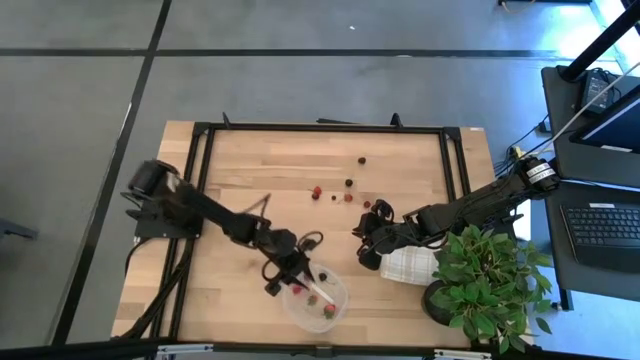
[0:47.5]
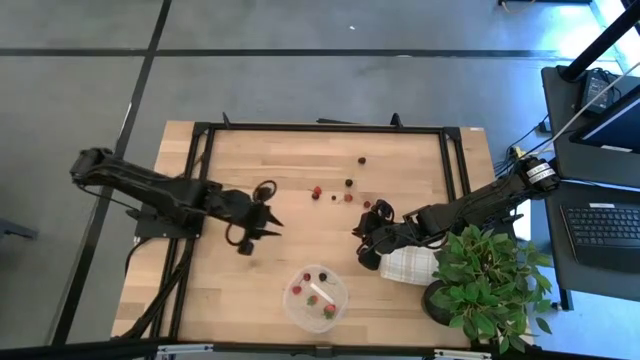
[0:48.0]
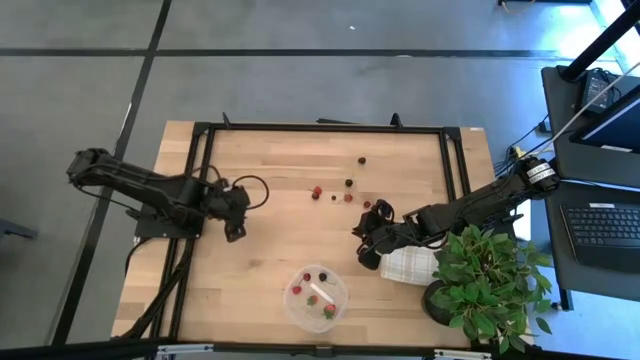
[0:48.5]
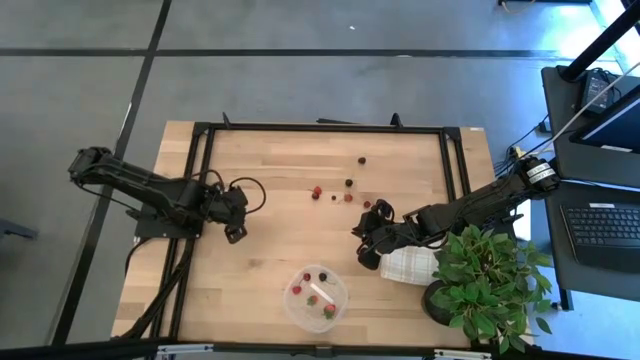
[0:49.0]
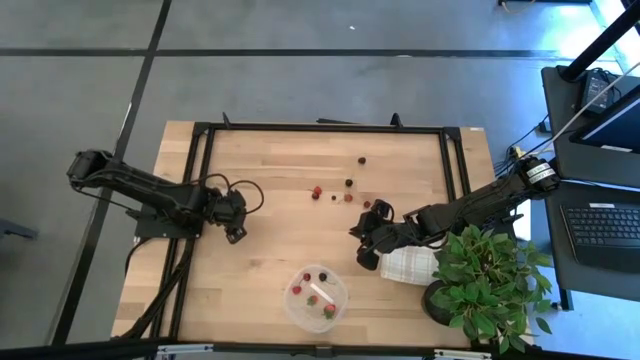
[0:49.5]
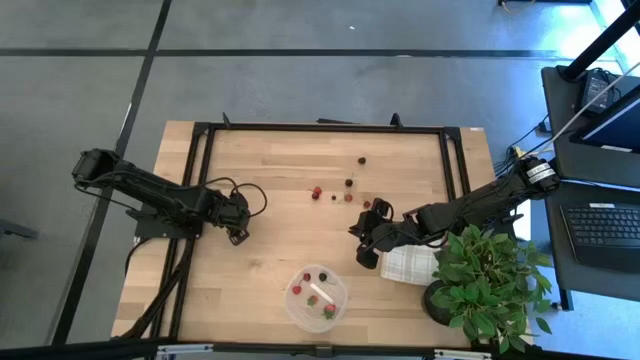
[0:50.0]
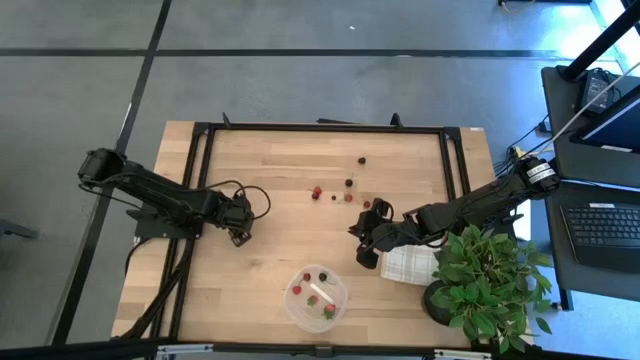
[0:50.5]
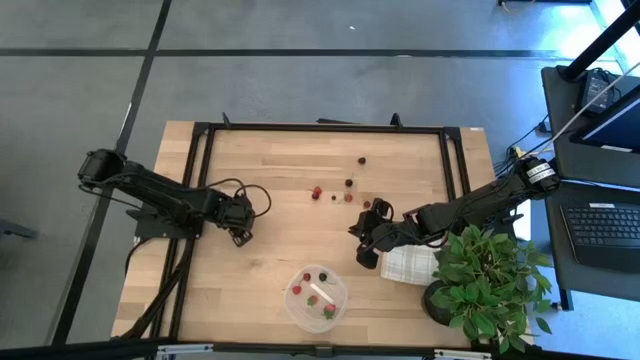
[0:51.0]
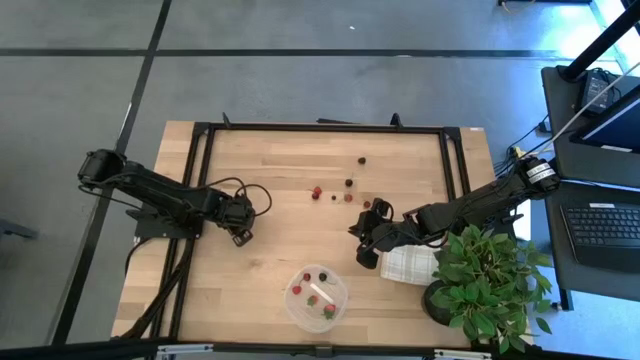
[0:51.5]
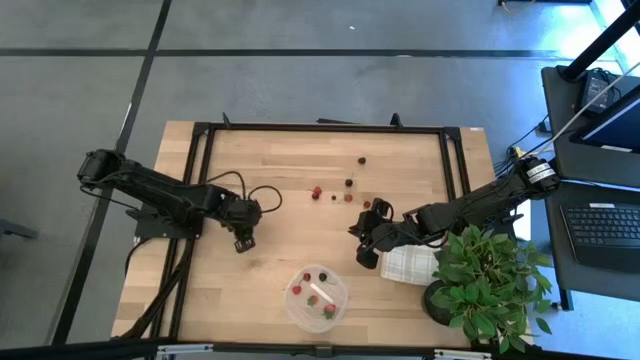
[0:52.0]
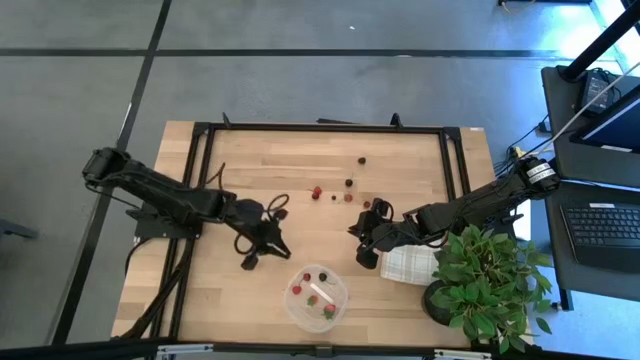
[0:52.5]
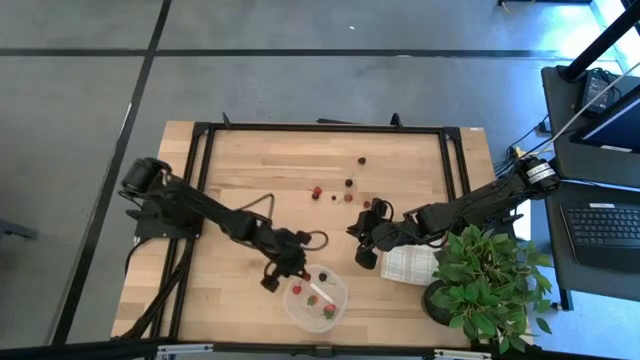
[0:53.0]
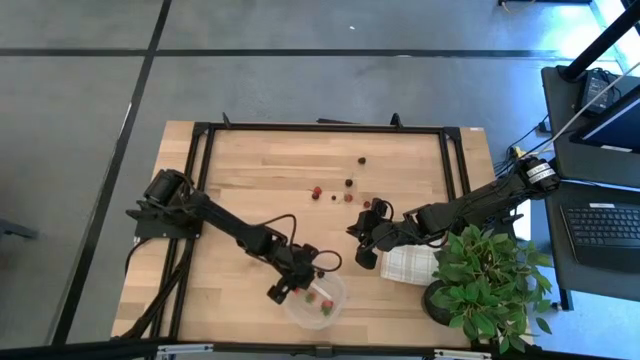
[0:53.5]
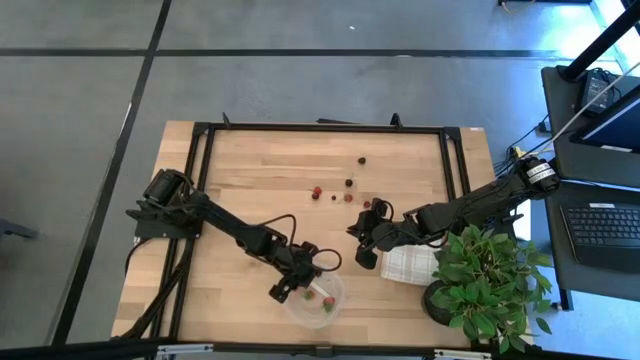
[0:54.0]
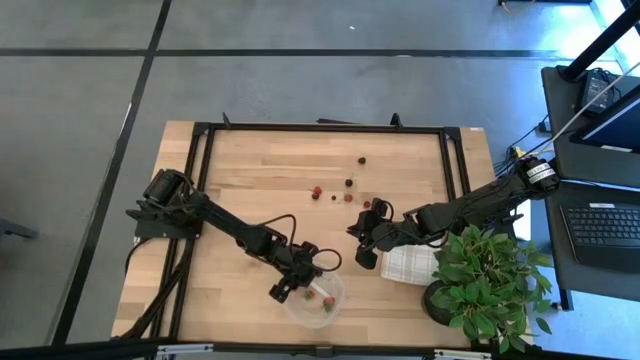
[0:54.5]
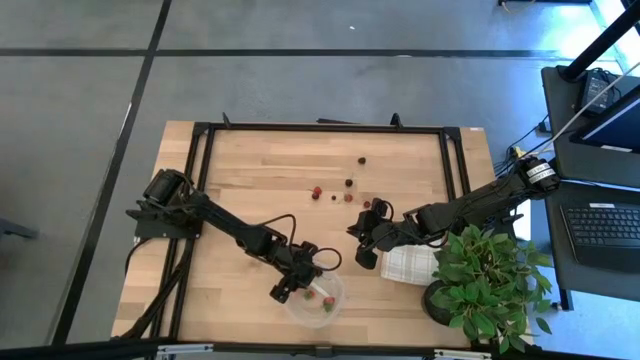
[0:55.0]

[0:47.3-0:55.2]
Task: Pick and placing Produce into tupperware
Put the blueberry in the bottom transparent bin

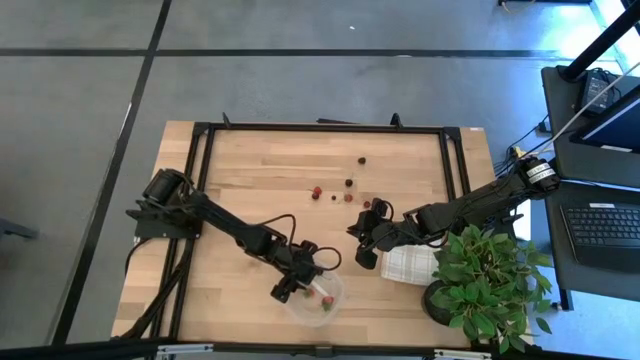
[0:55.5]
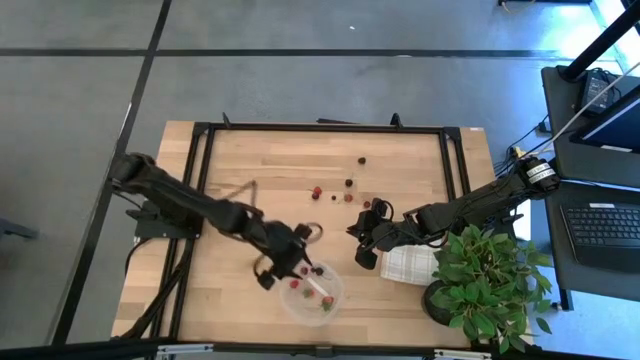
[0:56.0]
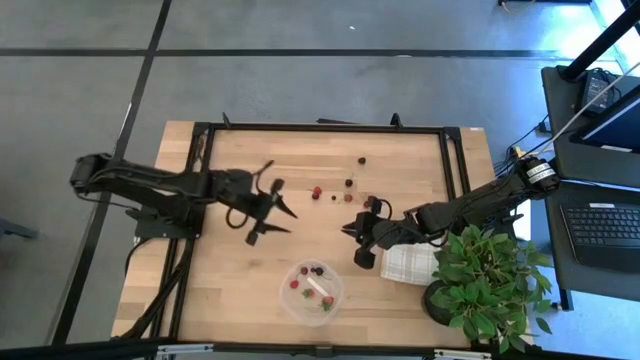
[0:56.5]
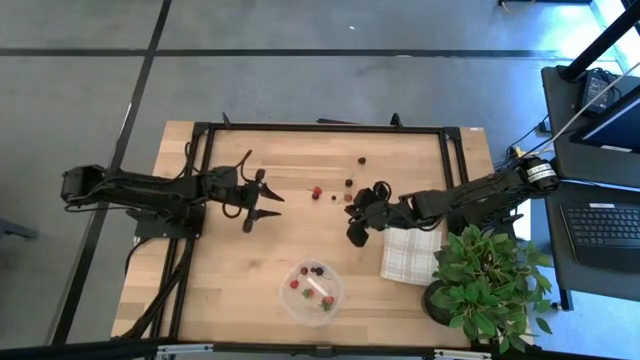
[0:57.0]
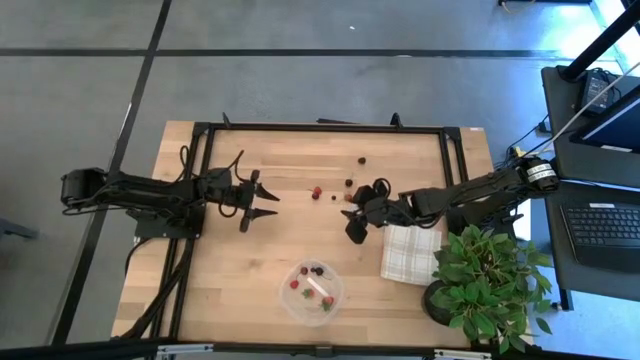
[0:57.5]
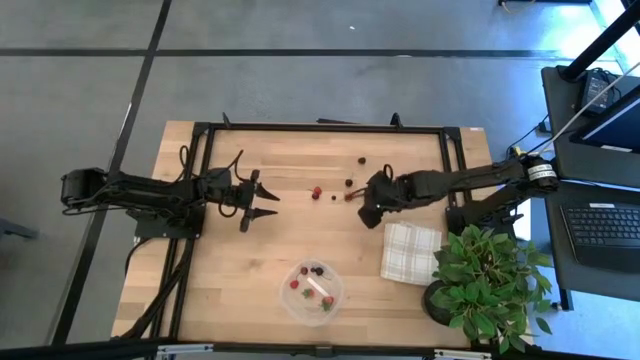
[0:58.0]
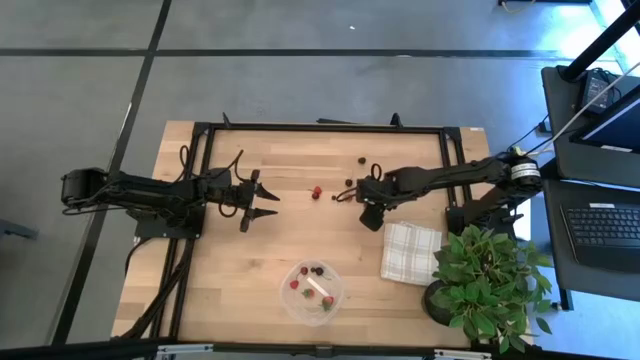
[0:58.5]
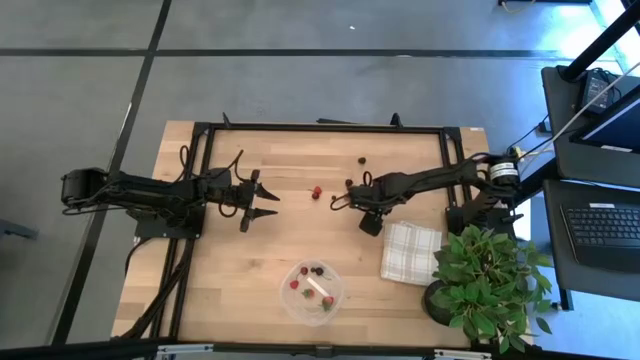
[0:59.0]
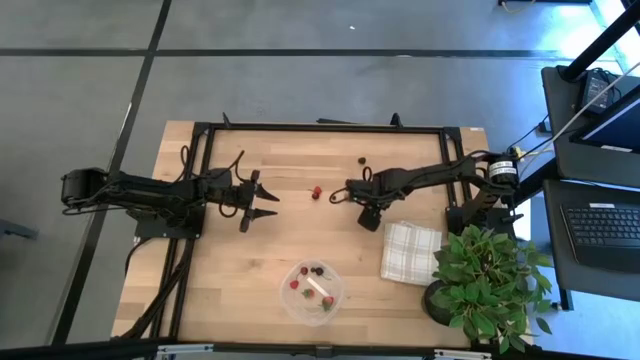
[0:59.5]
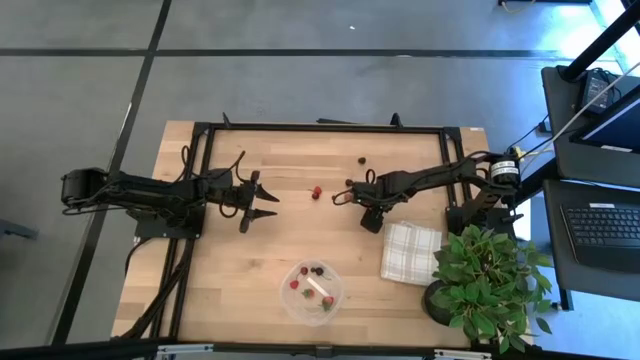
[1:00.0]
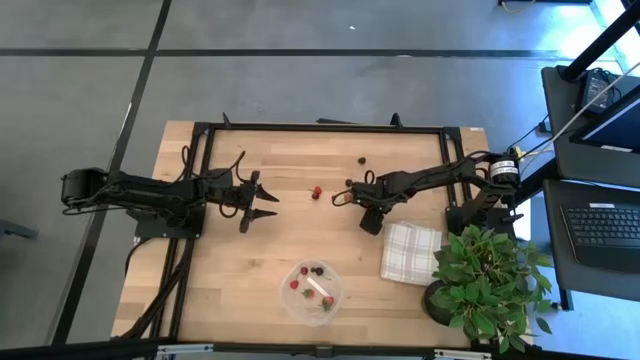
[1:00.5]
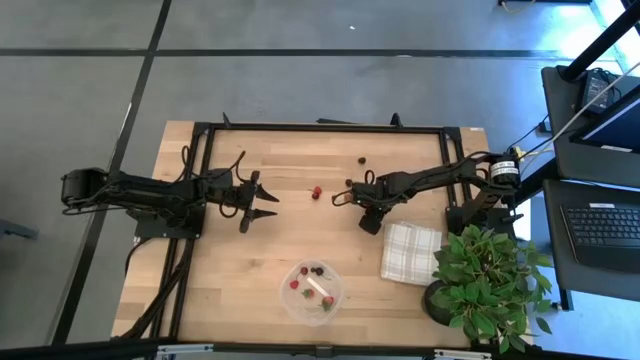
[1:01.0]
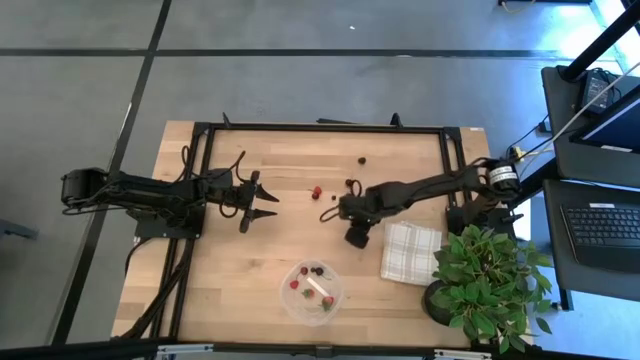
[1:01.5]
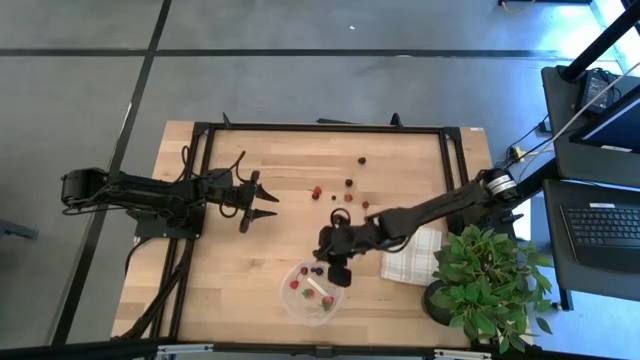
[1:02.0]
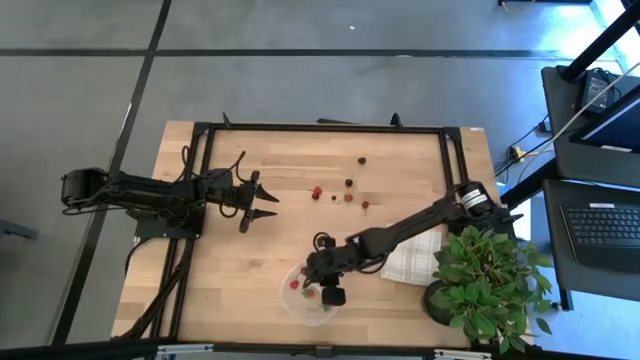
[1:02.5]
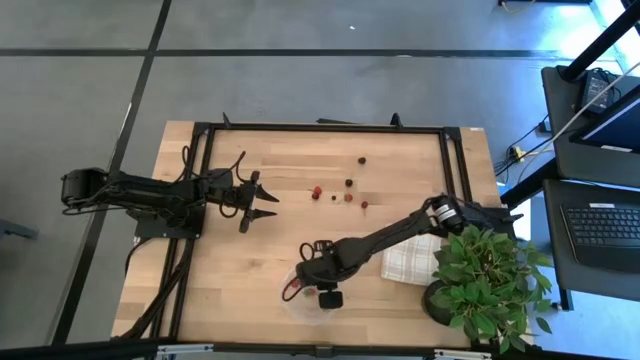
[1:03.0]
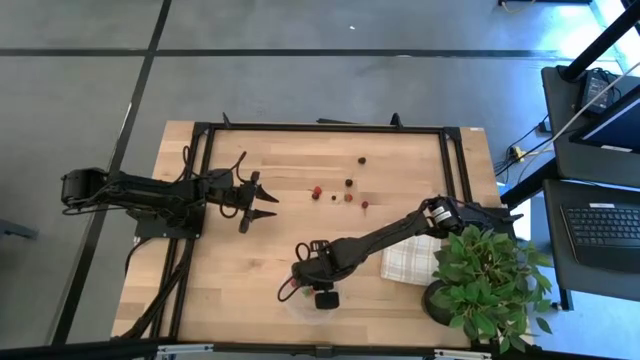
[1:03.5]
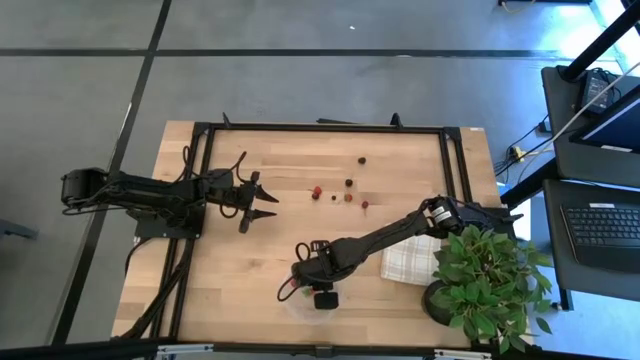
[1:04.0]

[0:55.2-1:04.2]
Put the blackberry in the bottom transparent bin

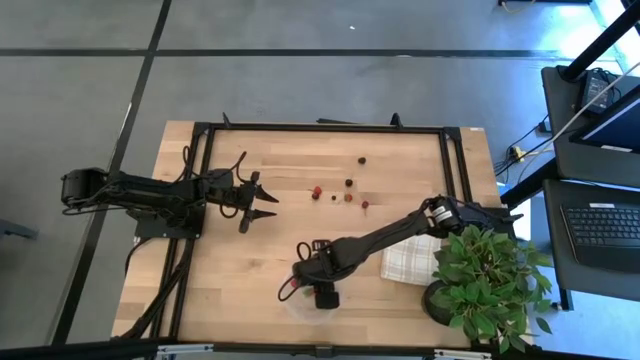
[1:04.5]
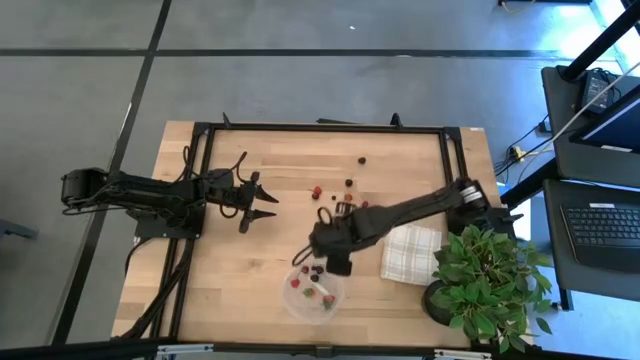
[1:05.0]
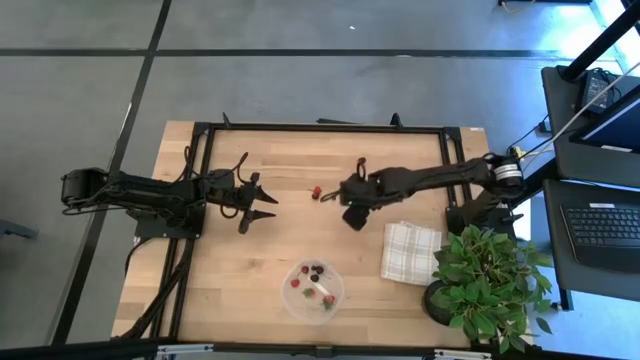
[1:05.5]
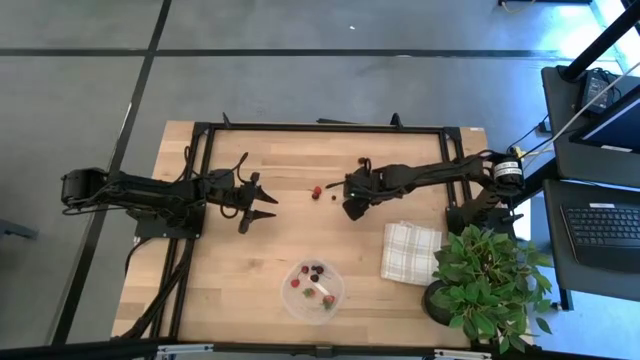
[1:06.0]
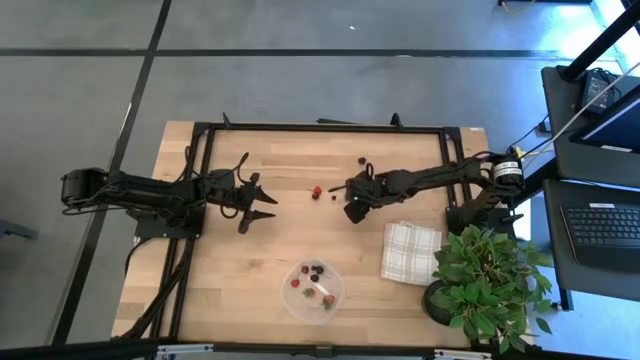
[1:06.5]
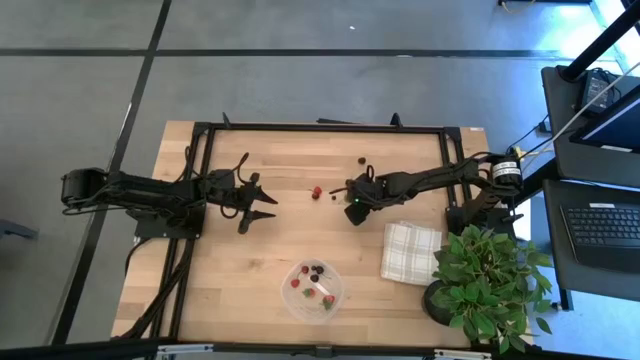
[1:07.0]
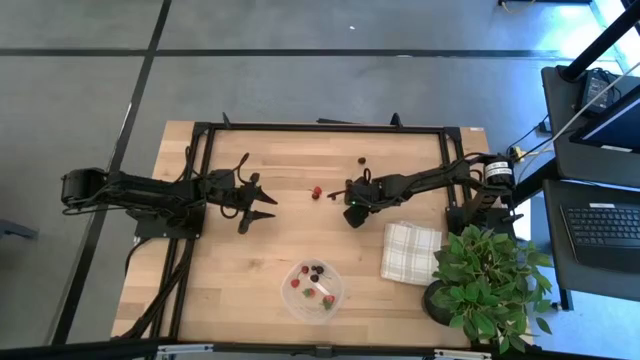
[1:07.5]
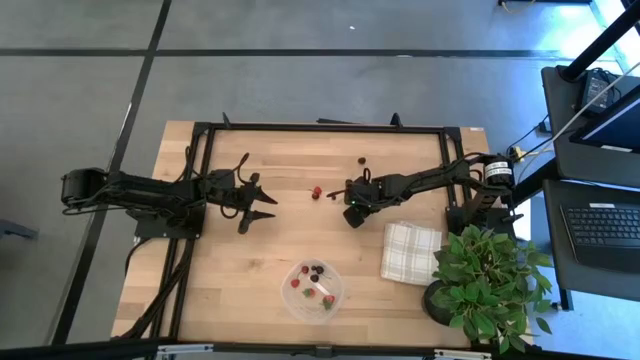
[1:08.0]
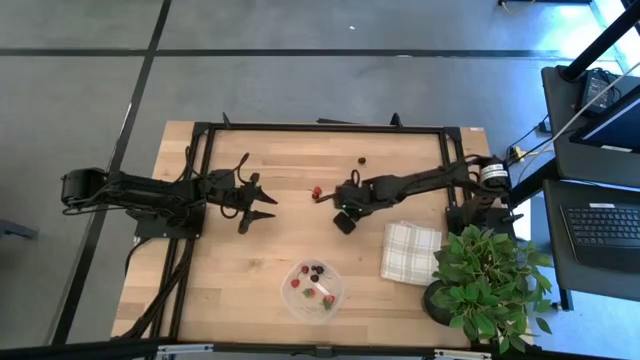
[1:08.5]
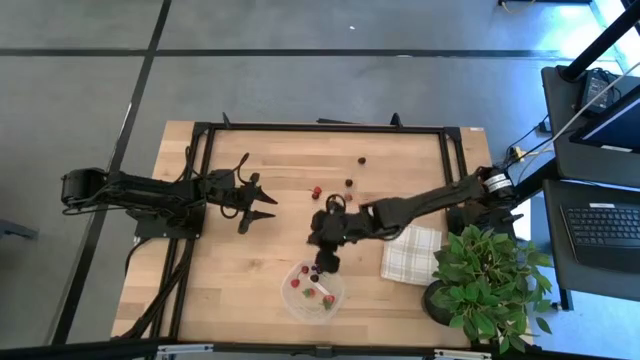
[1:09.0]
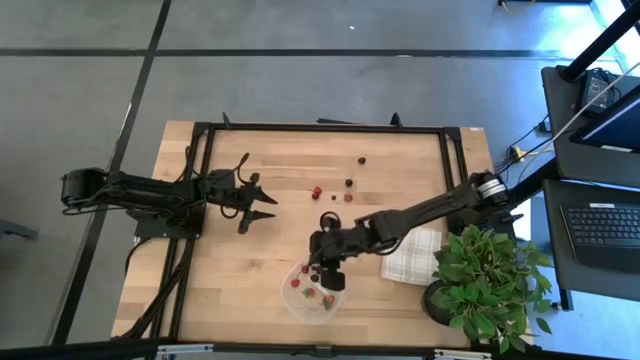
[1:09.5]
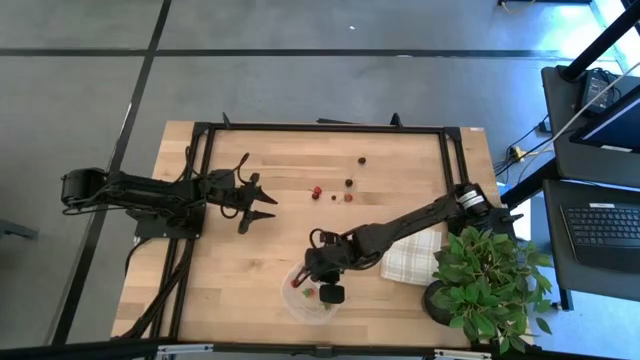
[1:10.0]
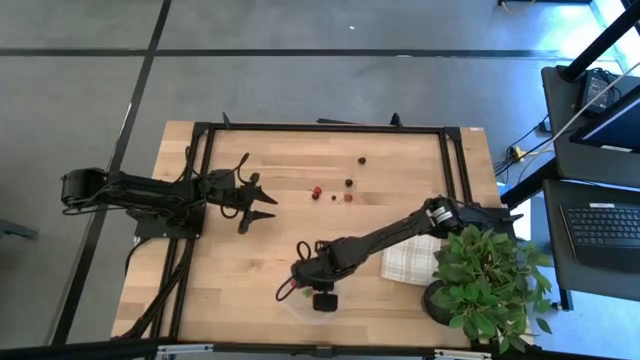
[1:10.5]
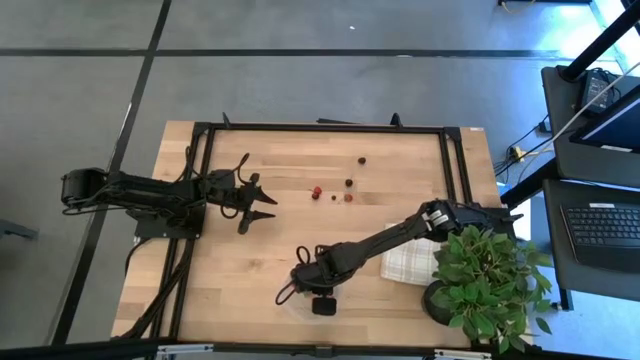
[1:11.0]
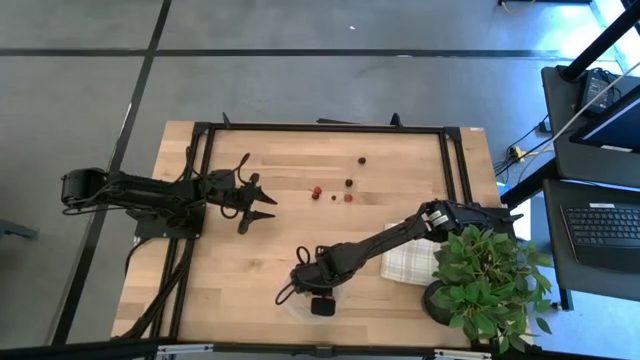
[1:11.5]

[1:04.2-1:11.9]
Put the dark red cherry in the bottom transparent bin
